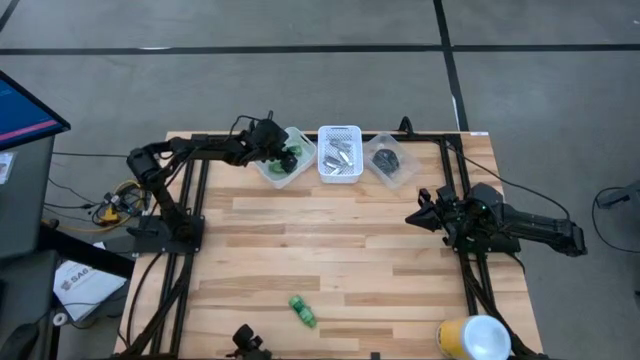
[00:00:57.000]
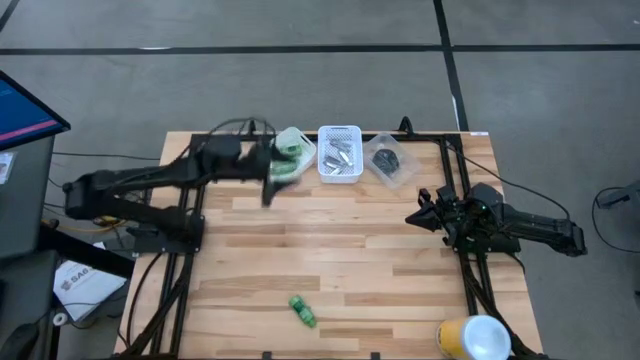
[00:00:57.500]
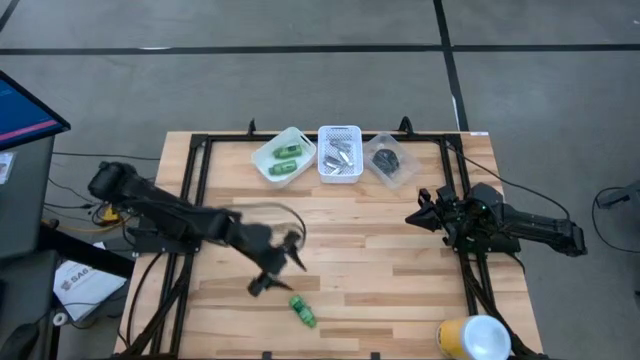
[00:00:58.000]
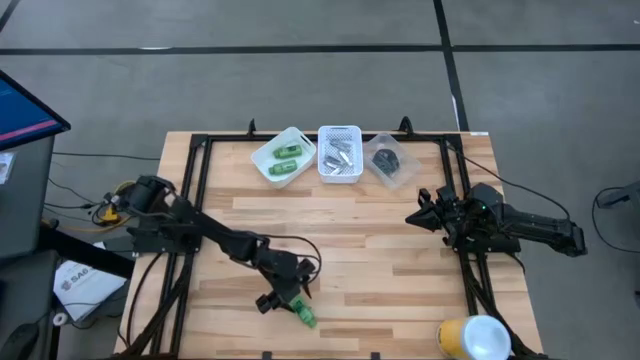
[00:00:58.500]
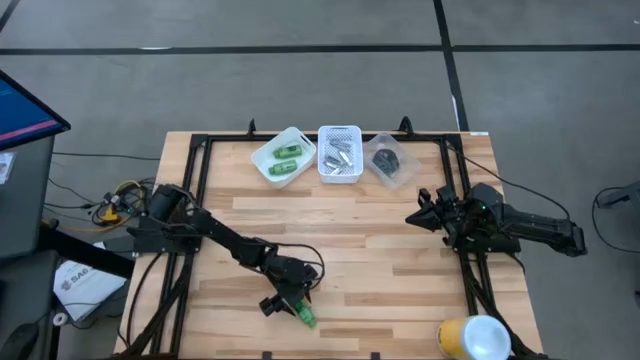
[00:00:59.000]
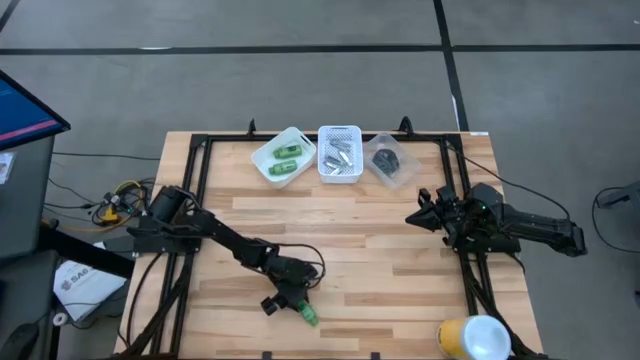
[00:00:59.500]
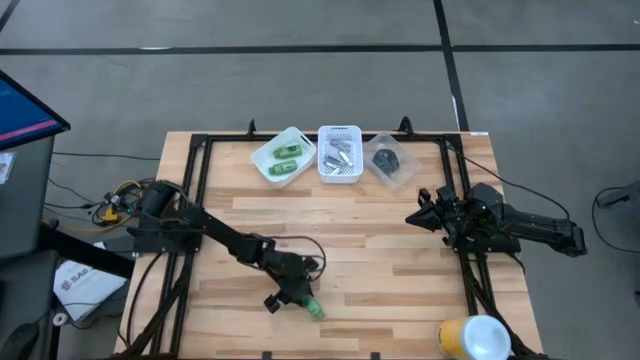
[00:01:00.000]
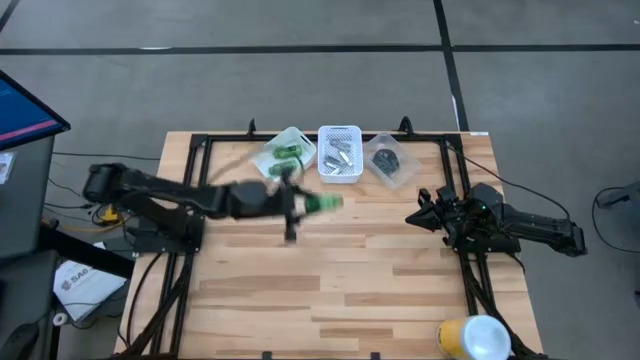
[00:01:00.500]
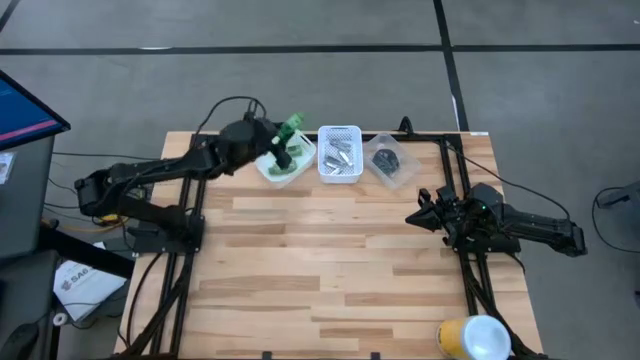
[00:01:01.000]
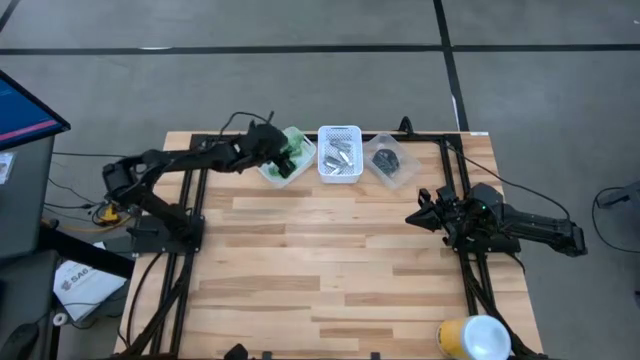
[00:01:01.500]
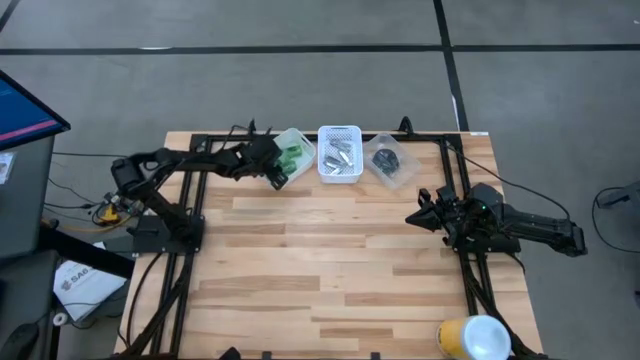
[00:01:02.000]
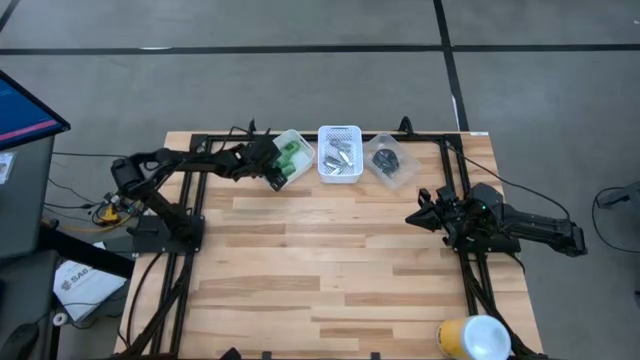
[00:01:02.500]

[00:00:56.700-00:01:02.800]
Task: Pick & Place Travel size toiletries
Put the green shampoo bottle into the left white bin

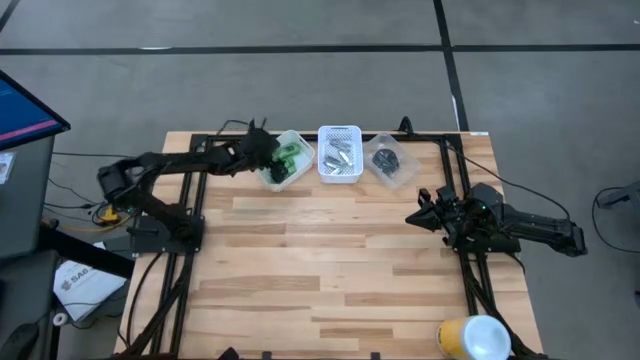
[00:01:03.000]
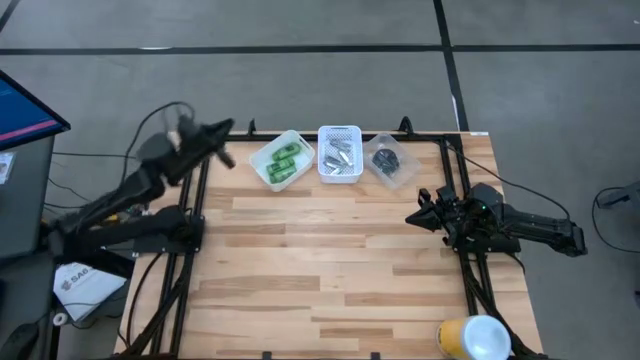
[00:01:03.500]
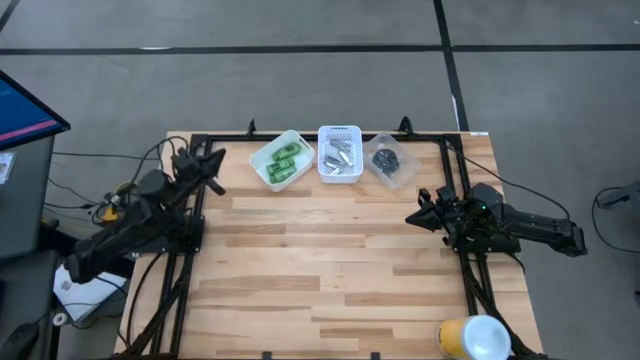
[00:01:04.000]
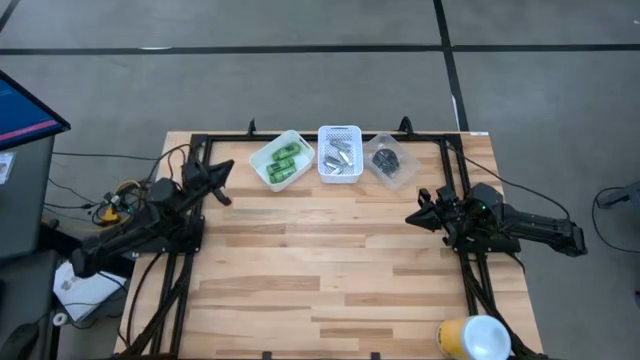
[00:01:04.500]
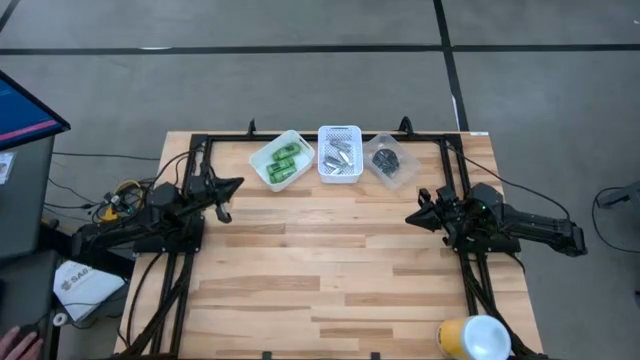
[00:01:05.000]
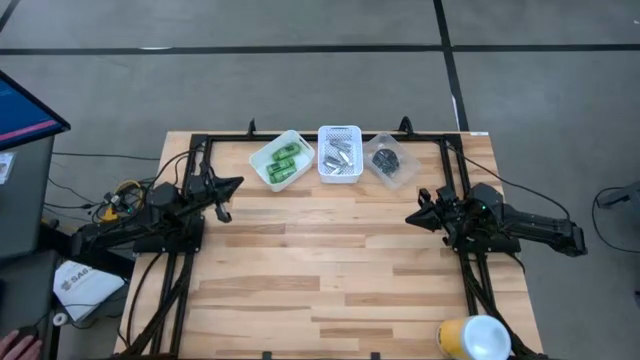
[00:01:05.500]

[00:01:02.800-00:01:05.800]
Return to Home Position

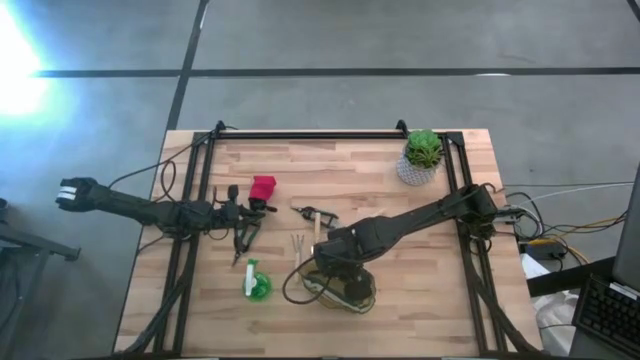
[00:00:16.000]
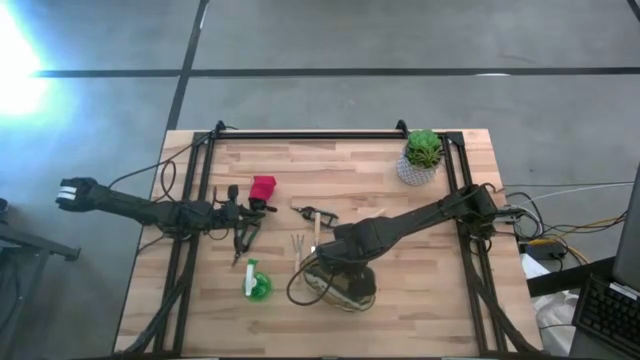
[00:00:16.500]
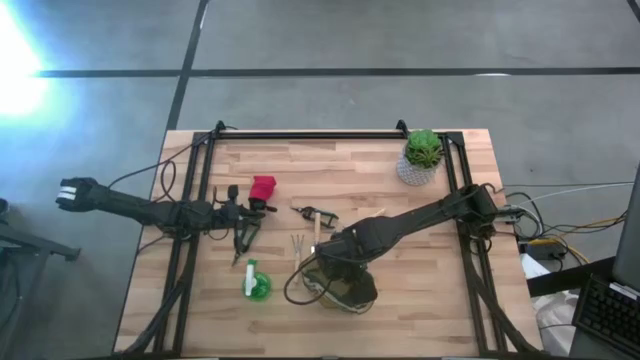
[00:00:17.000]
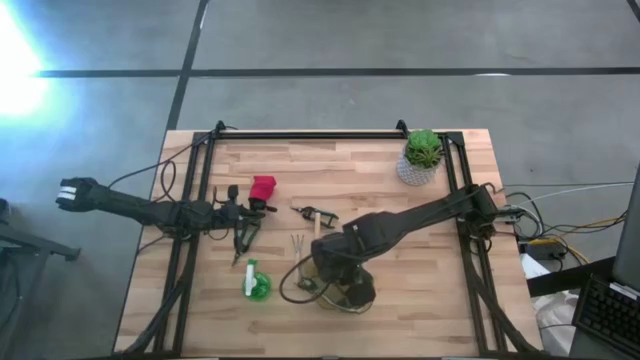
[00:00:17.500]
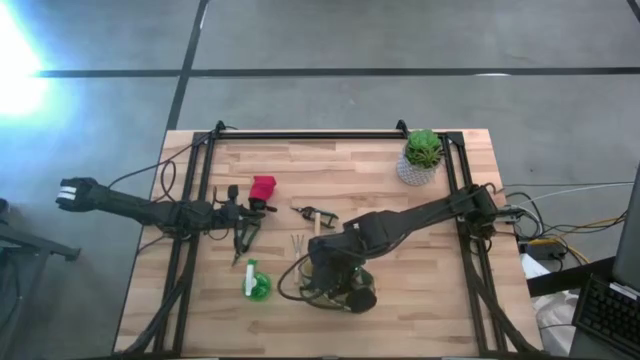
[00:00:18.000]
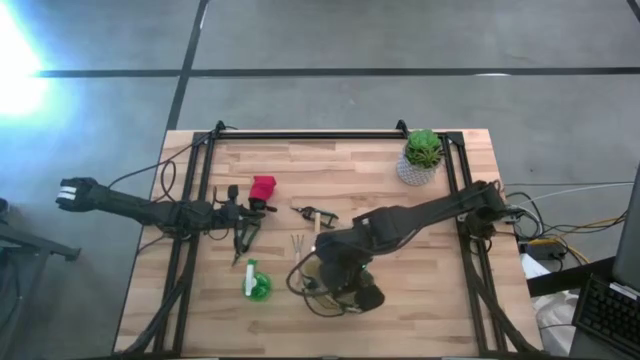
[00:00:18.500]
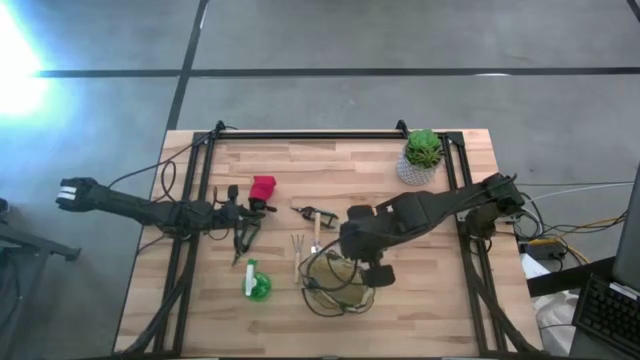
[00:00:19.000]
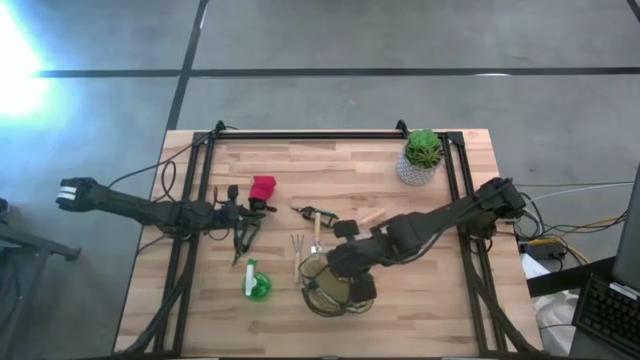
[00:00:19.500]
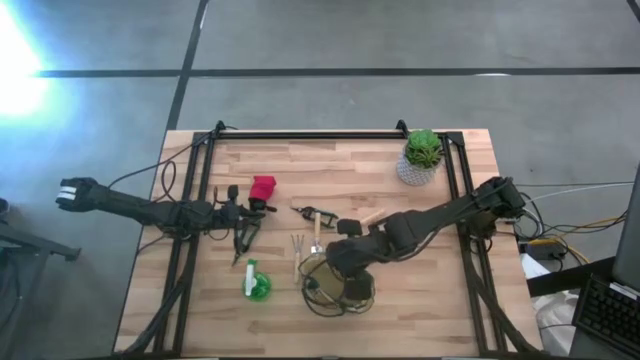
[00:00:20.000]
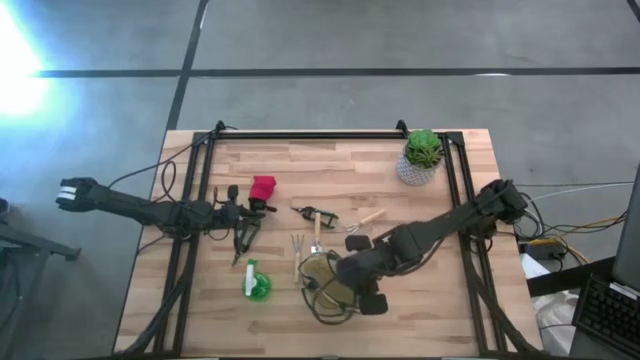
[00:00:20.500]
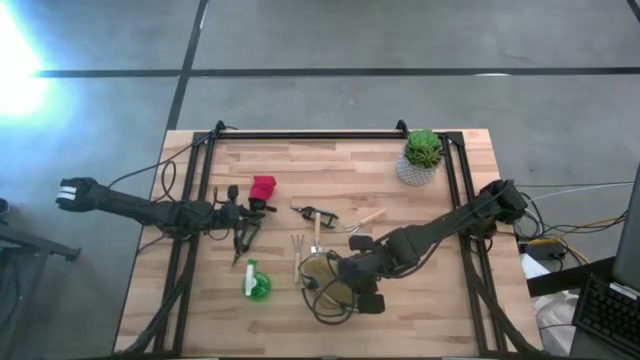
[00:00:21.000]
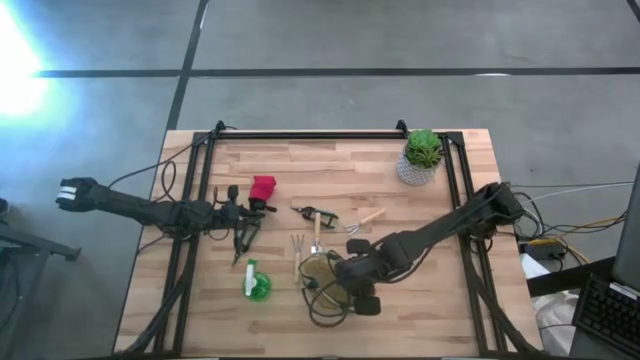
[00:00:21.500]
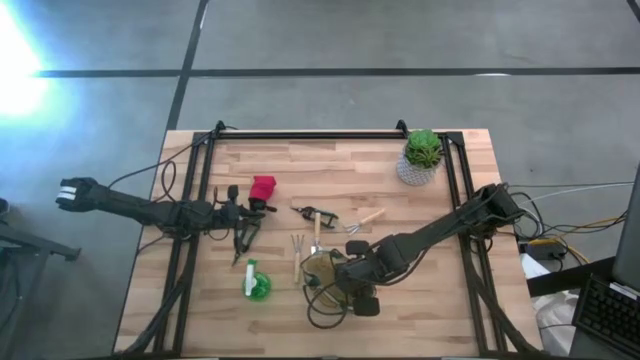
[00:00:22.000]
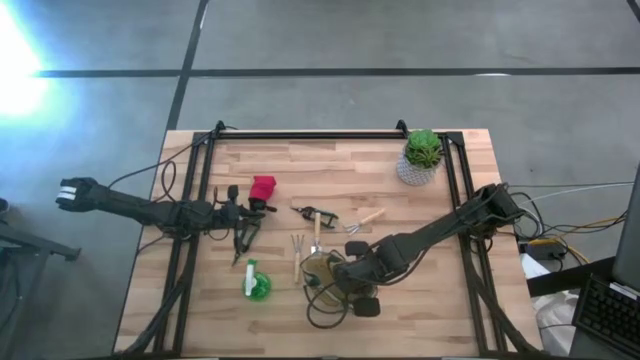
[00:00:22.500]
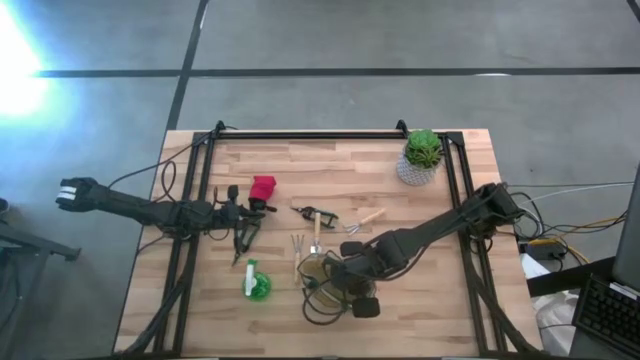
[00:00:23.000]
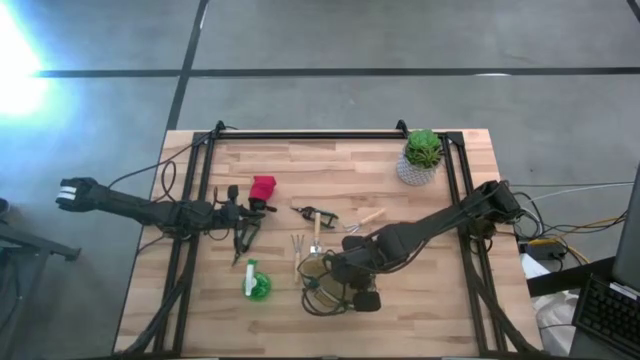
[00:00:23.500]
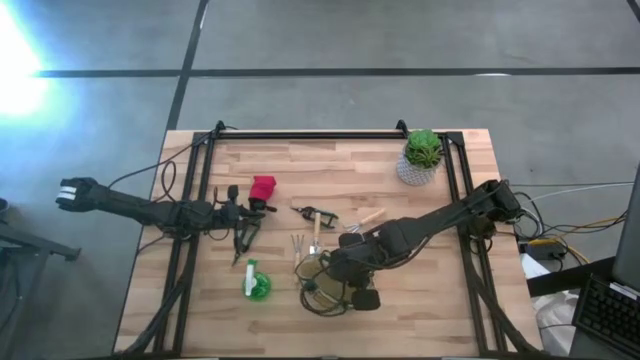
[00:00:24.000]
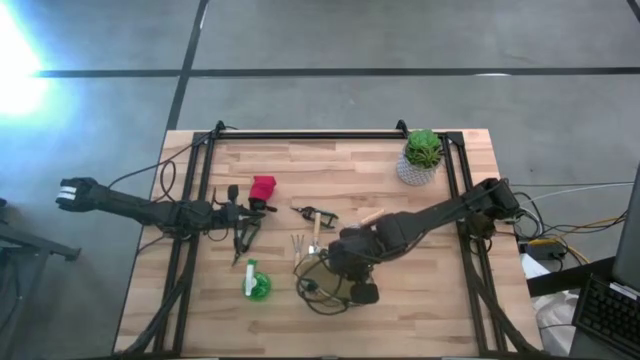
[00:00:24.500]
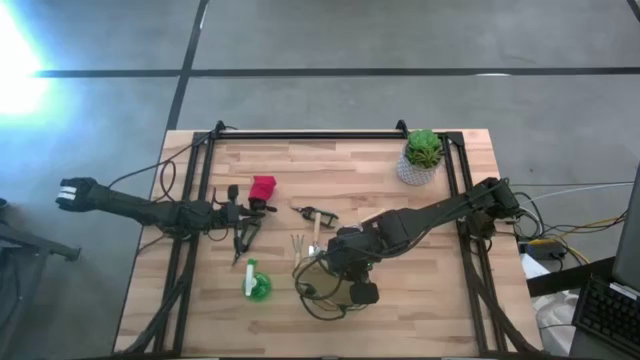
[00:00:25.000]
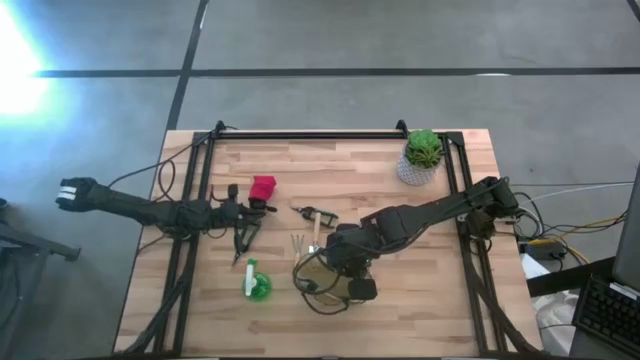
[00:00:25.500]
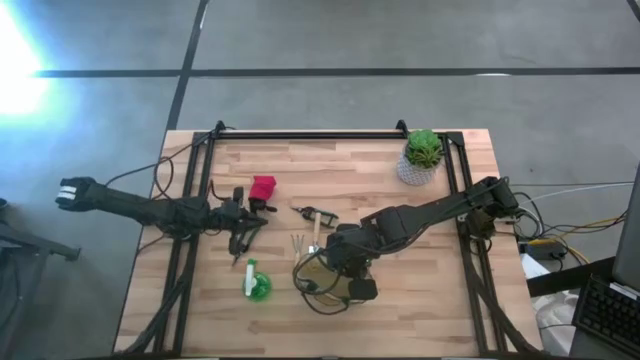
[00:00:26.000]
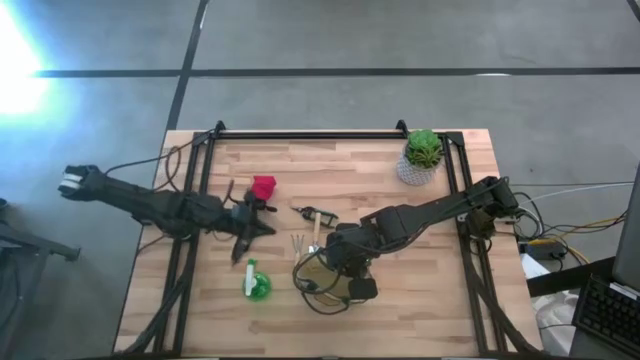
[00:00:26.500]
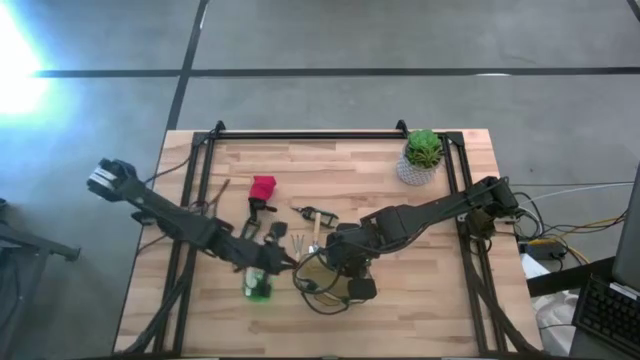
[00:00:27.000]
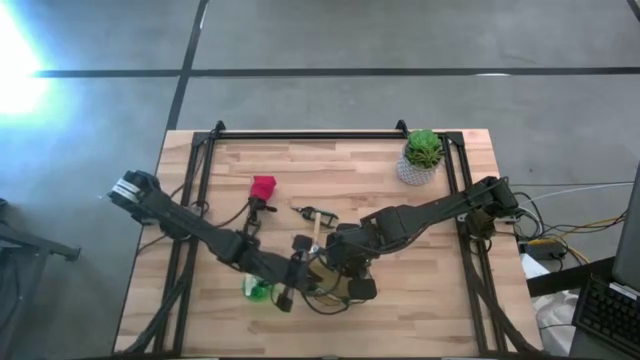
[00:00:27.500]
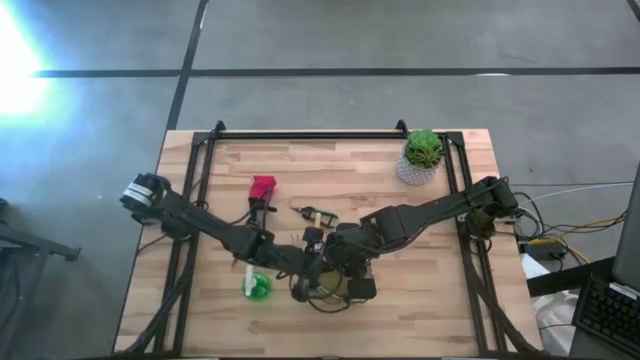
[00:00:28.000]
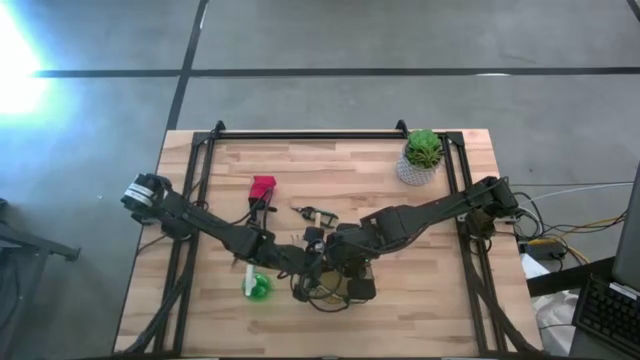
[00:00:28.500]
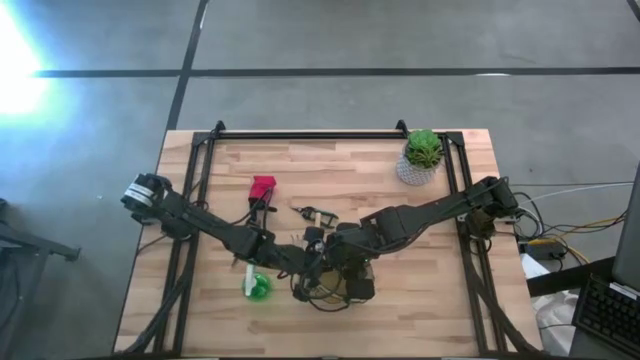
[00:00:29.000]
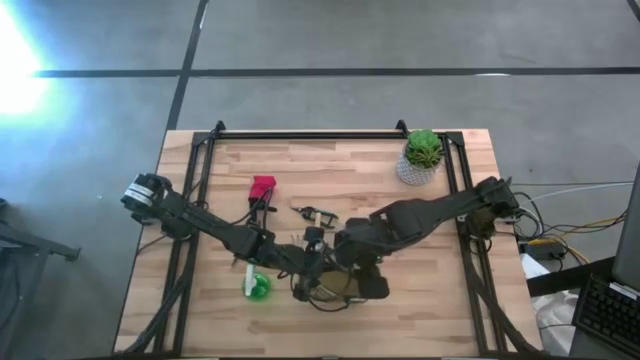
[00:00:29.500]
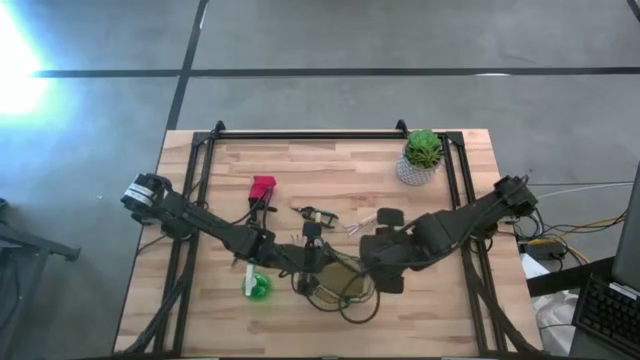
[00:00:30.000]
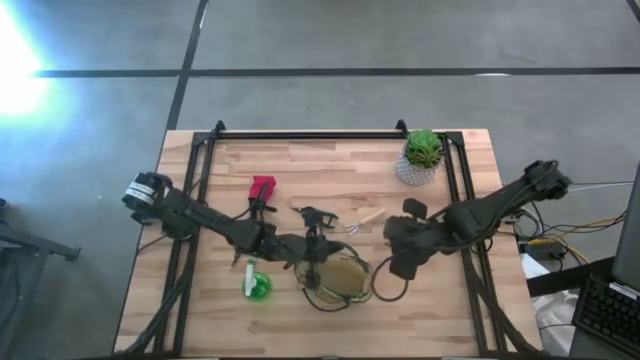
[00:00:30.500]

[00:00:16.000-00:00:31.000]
Task: Pick & Place Garden tools in Gardening bag
Prepare the white gardening bag
